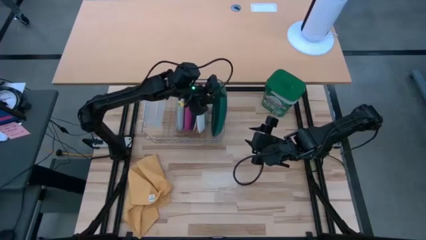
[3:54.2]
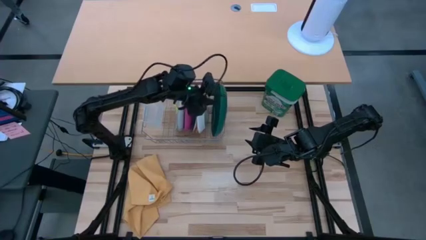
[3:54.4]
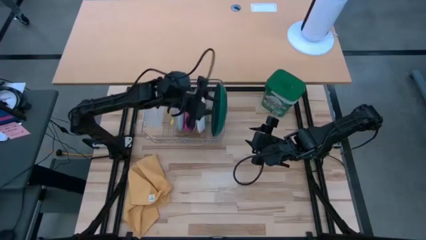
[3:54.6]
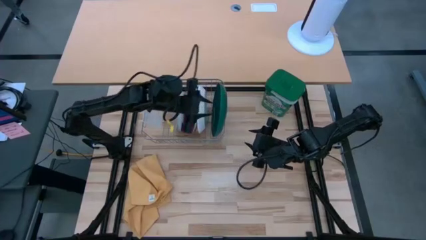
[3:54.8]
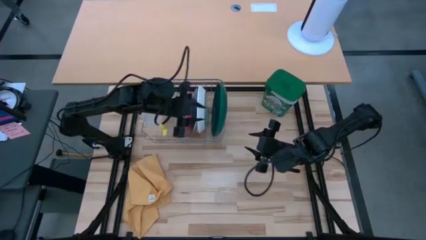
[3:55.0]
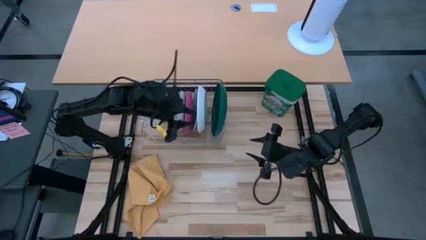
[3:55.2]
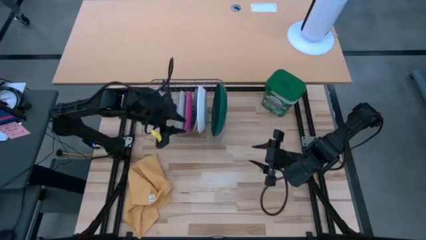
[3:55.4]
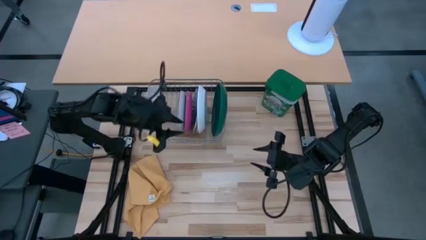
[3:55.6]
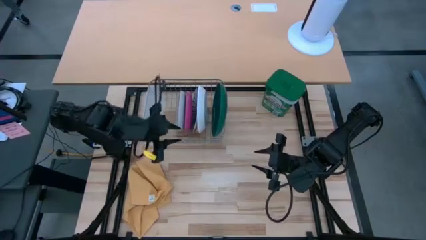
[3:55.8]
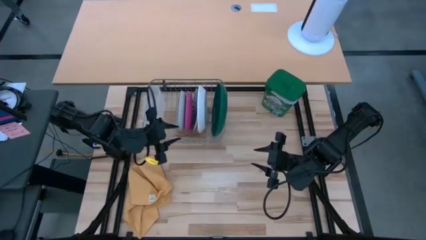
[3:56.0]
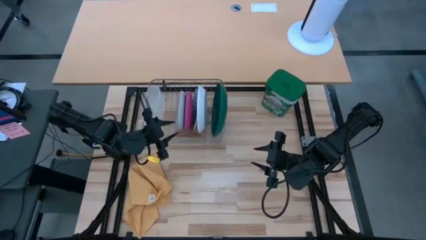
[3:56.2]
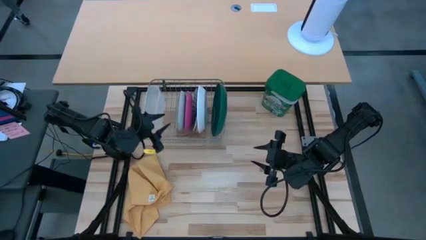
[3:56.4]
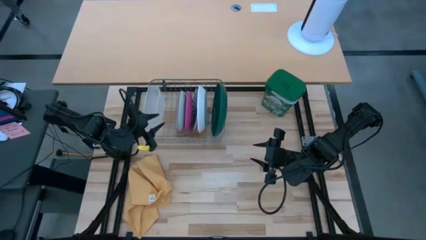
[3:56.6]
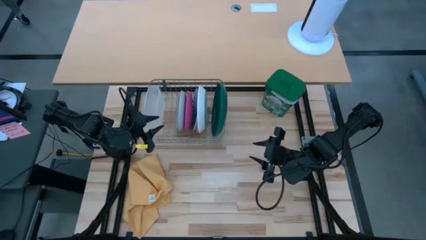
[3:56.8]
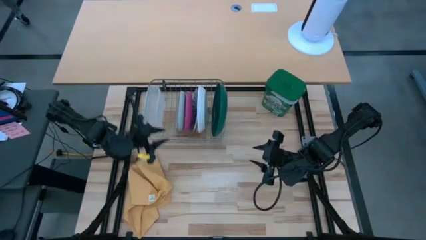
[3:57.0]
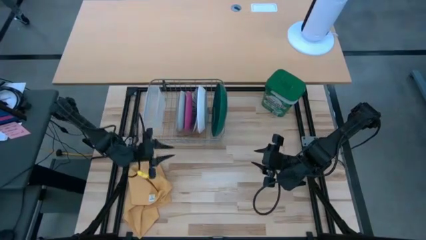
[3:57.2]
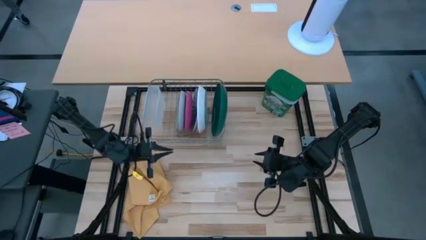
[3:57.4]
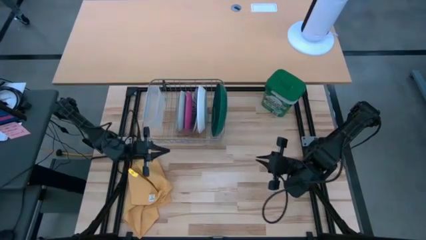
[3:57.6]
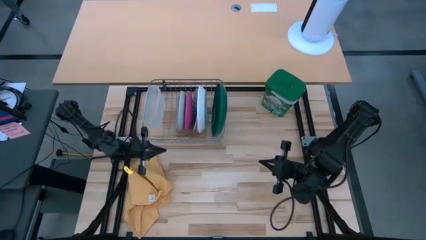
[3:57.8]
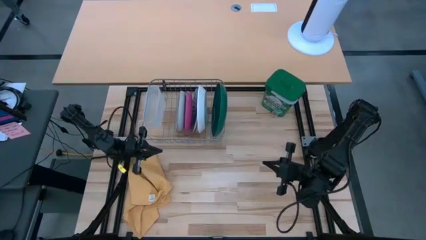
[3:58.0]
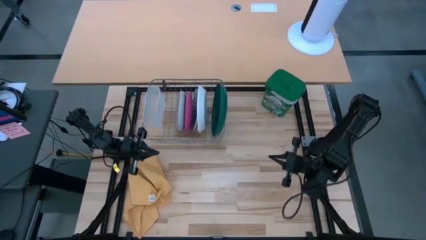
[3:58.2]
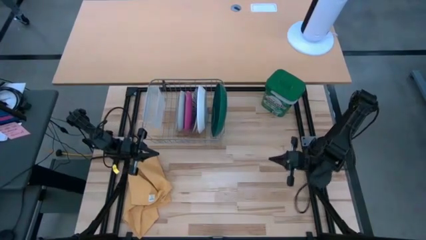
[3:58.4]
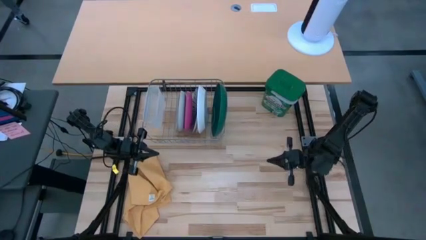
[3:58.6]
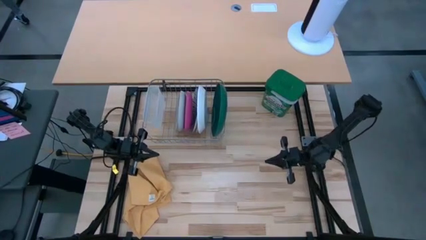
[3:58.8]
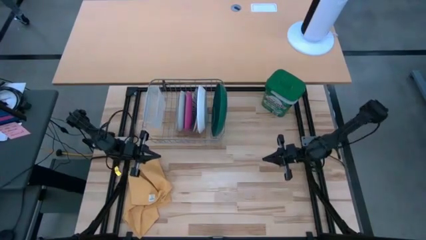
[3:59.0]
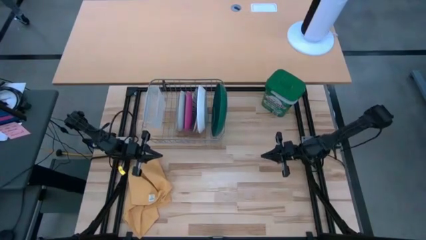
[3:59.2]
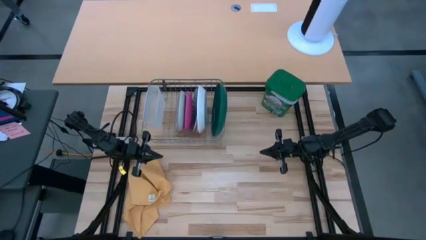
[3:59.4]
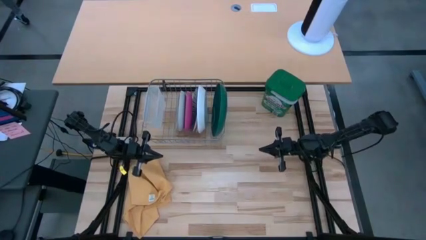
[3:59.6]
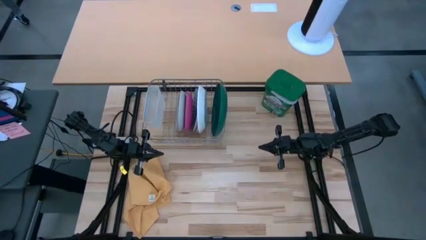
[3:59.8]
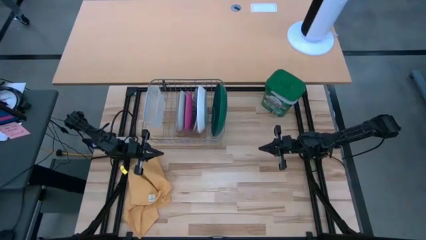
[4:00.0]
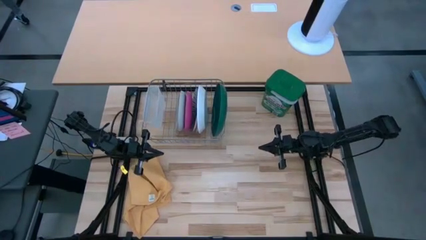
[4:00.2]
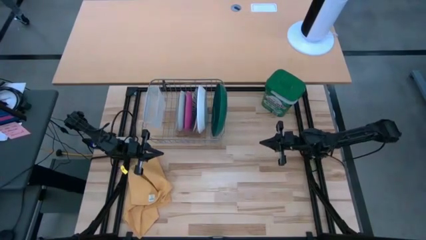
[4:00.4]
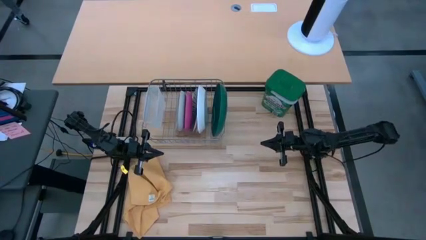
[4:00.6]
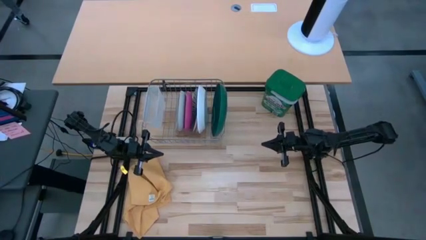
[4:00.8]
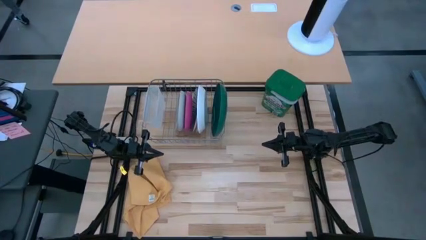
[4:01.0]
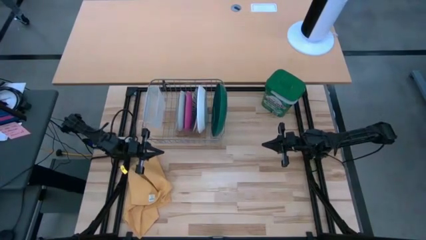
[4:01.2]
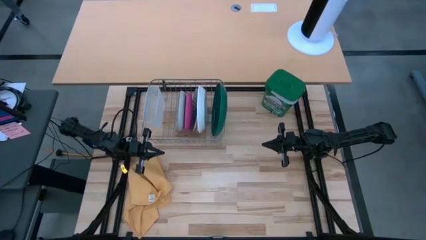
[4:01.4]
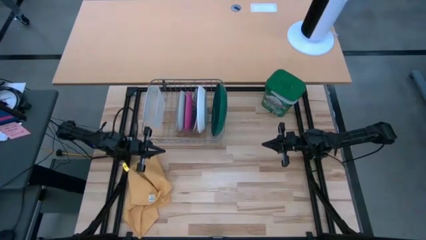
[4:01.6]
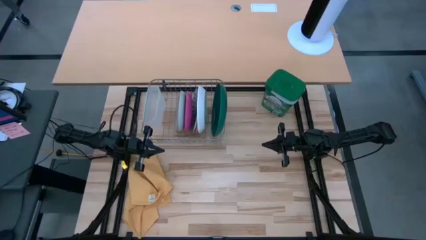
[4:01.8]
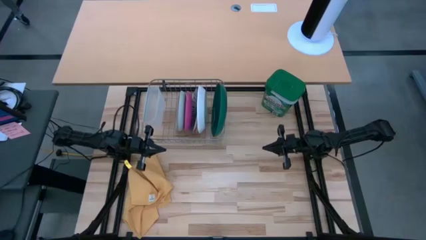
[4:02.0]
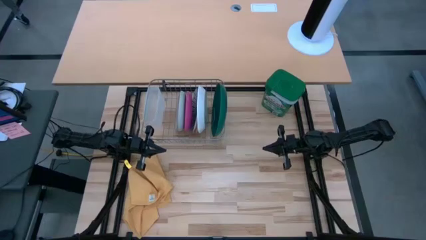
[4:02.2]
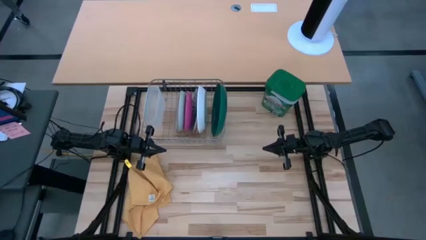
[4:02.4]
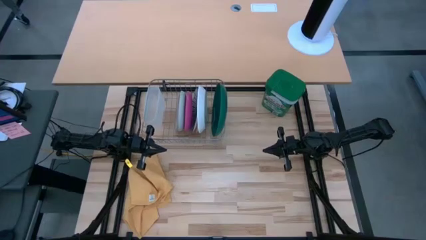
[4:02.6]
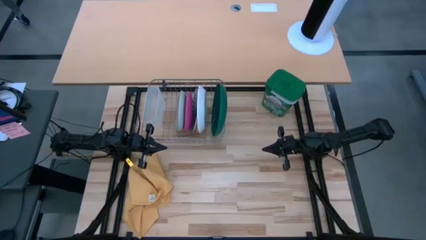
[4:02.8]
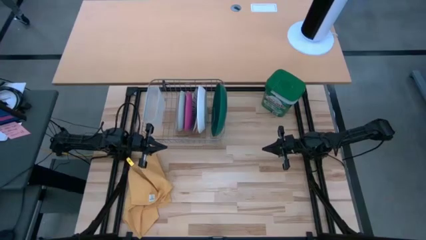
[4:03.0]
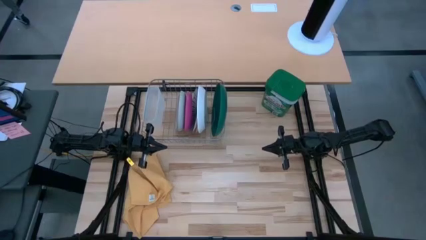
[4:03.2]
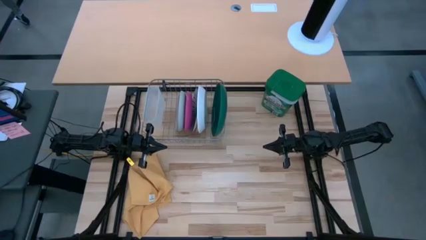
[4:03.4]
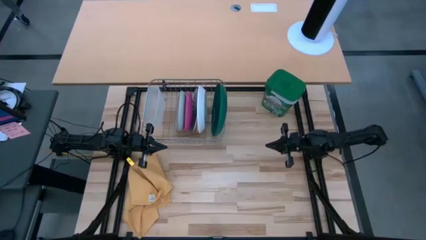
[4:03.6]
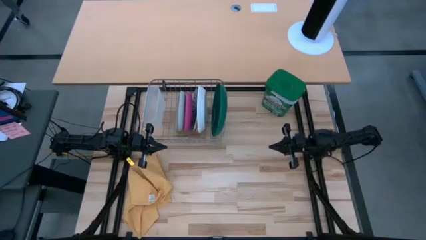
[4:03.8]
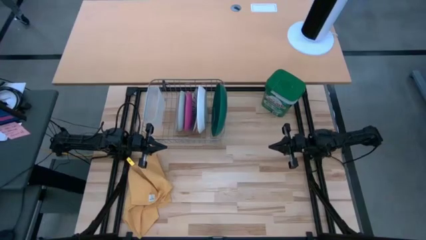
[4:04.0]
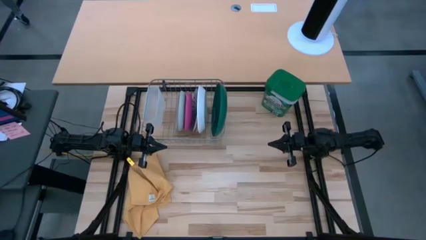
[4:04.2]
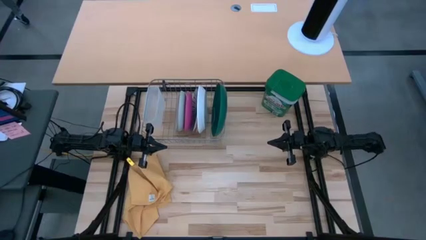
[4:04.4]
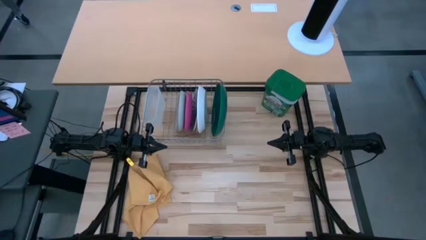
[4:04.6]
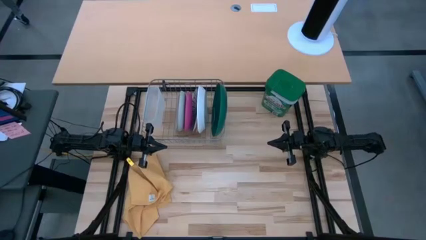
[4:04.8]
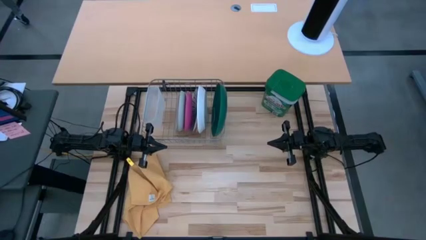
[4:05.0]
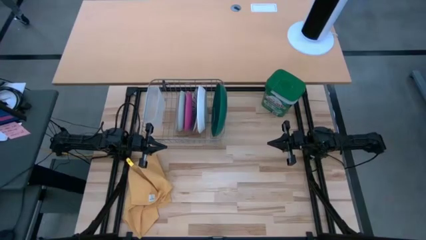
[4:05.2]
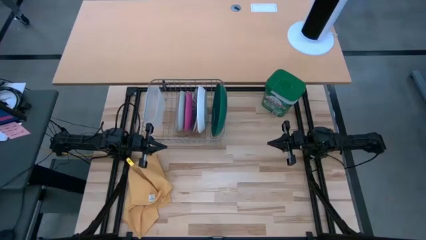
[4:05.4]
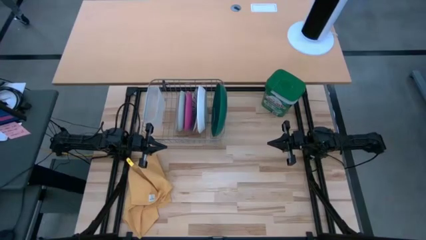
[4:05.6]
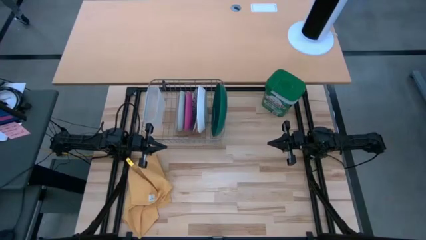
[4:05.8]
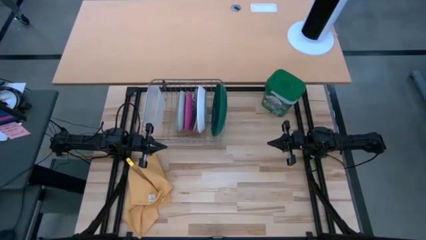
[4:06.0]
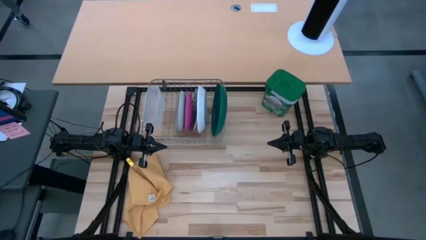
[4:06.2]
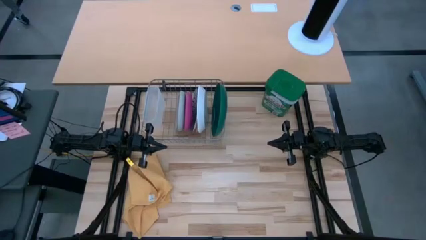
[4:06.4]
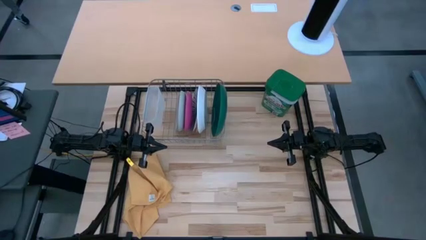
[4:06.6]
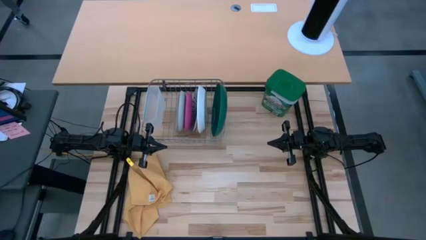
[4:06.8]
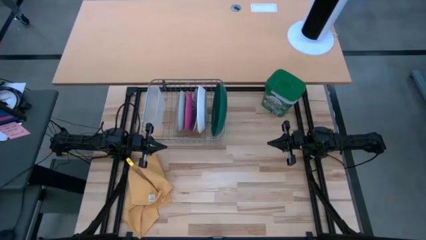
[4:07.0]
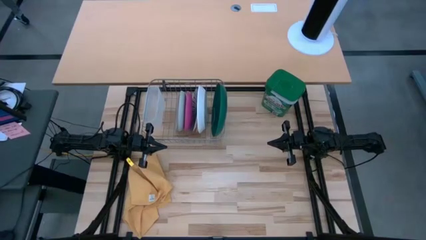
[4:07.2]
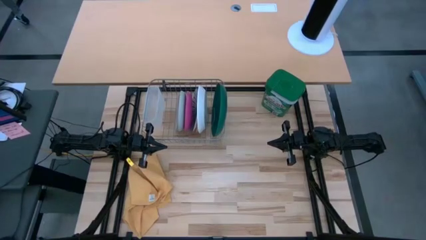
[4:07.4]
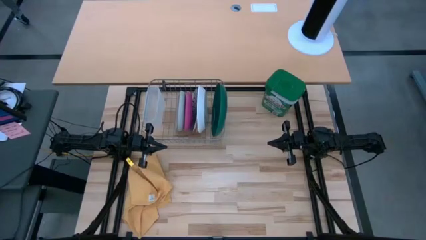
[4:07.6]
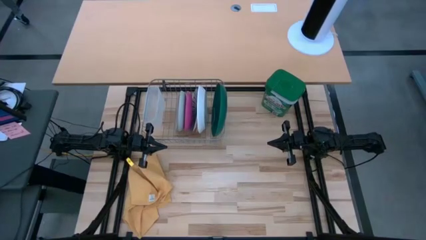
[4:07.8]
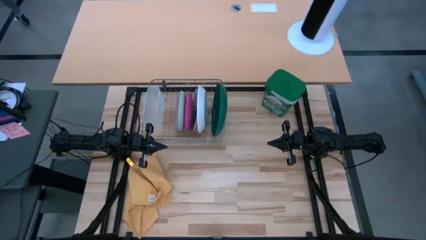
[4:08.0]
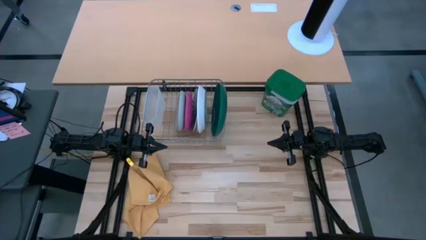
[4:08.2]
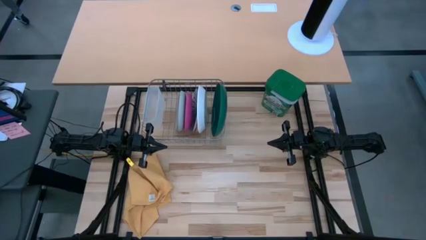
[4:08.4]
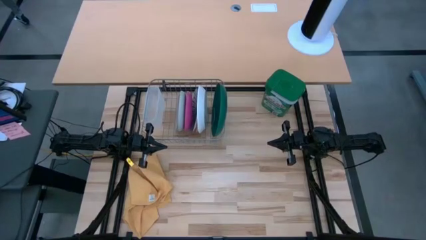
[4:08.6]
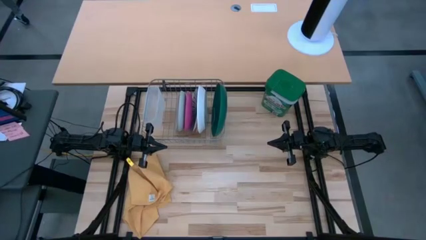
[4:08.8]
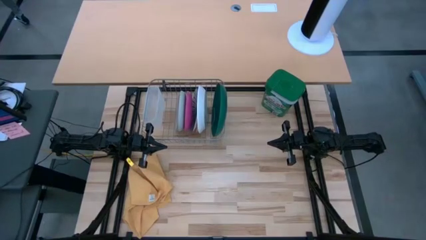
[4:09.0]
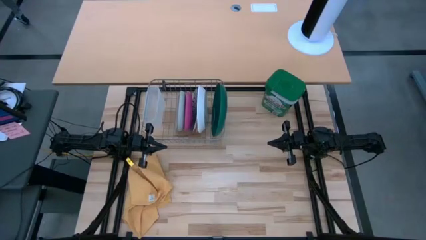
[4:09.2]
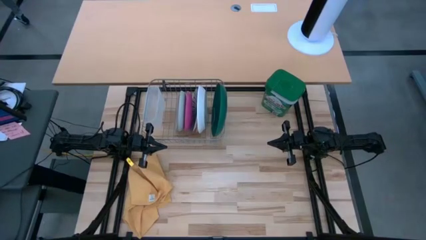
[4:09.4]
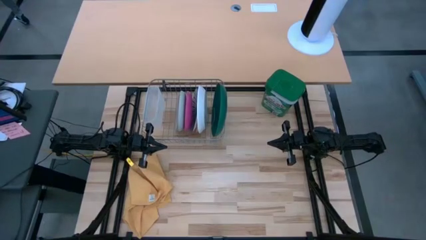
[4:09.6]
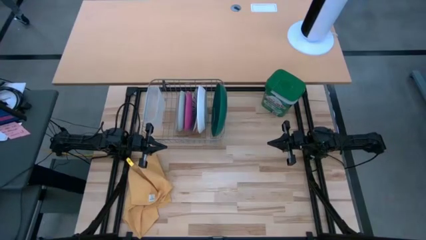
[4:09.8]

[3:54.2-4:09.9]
Task: Sort dishes
Return to Home Position
